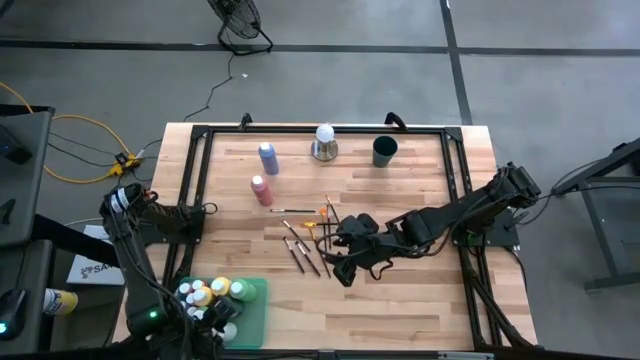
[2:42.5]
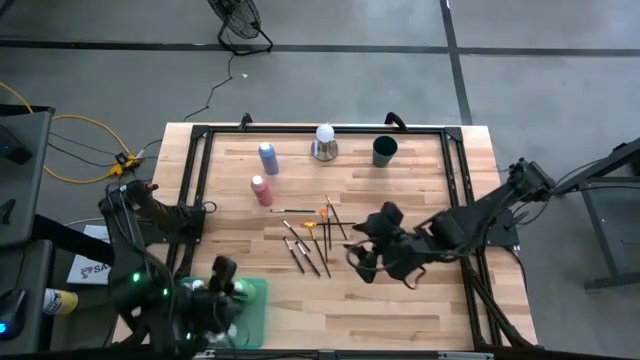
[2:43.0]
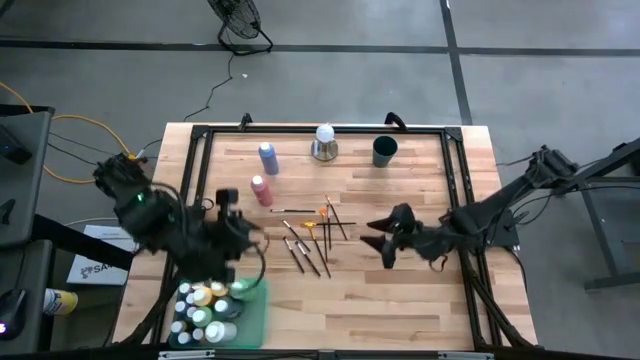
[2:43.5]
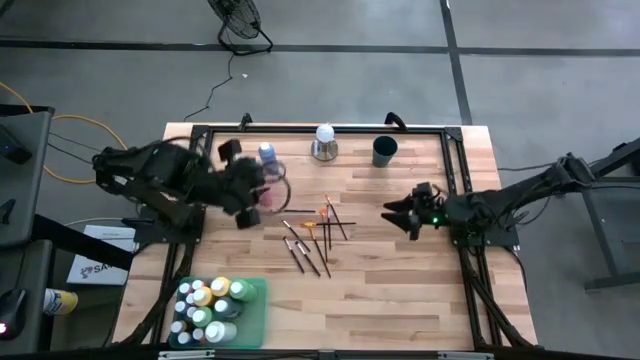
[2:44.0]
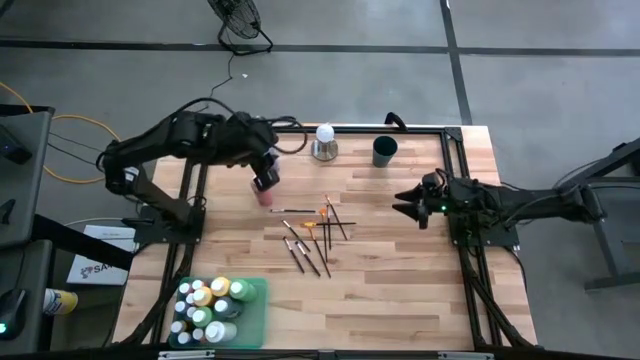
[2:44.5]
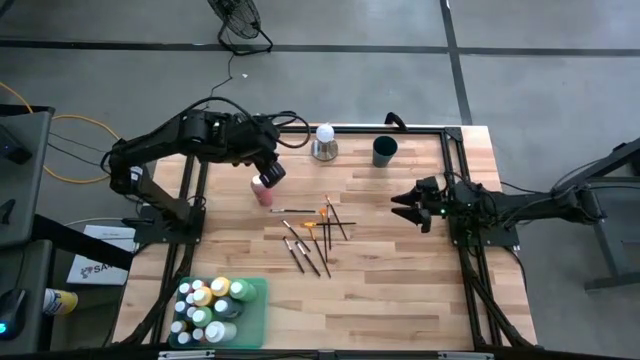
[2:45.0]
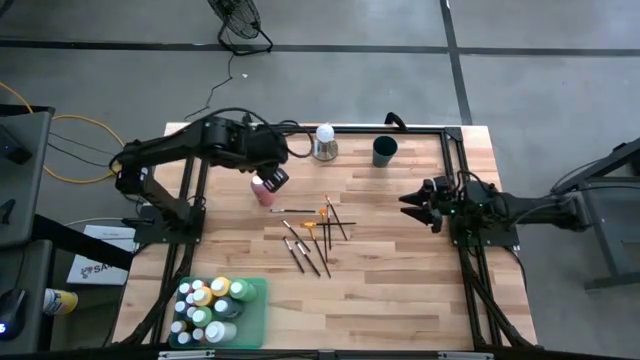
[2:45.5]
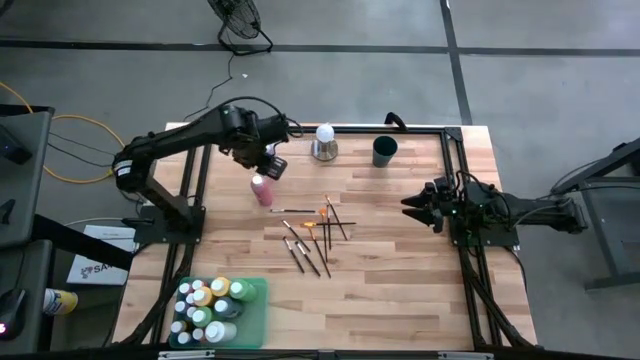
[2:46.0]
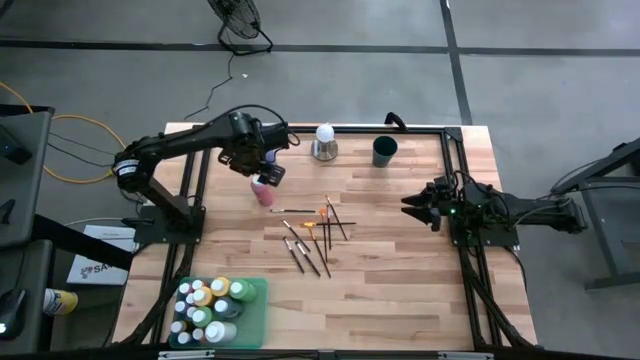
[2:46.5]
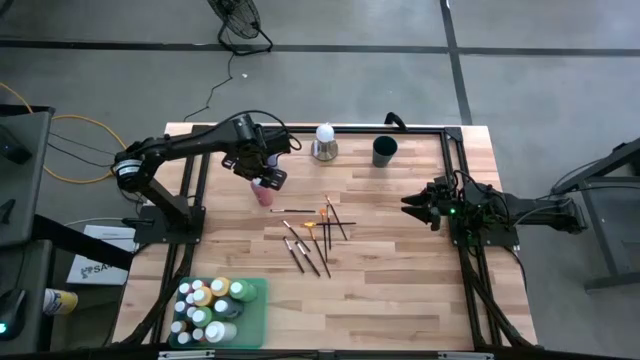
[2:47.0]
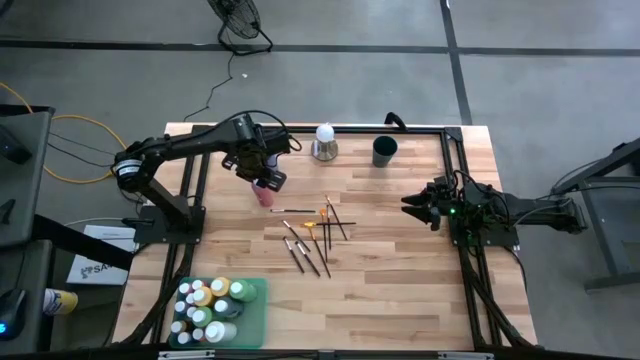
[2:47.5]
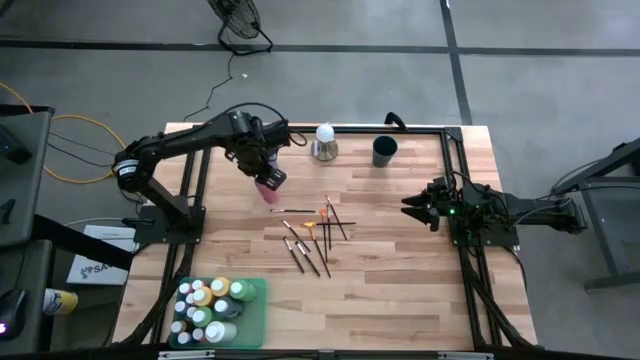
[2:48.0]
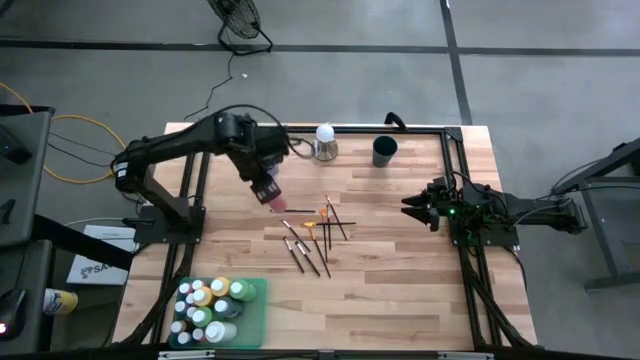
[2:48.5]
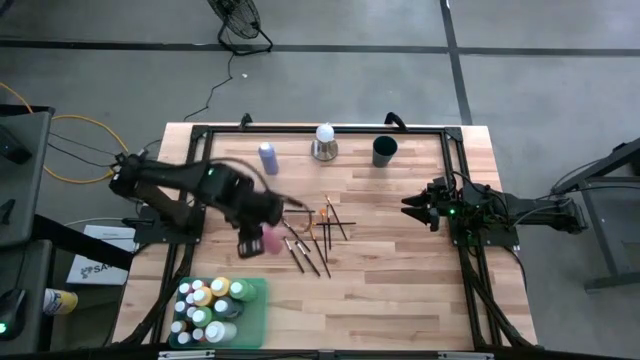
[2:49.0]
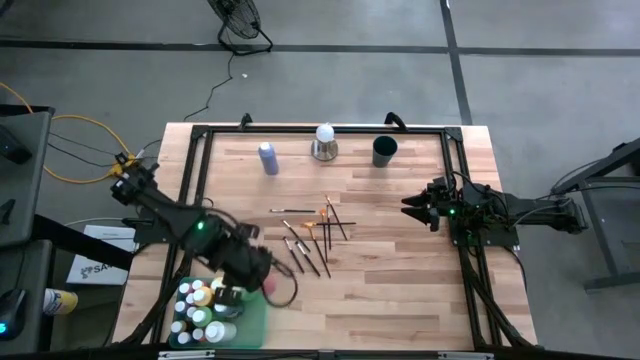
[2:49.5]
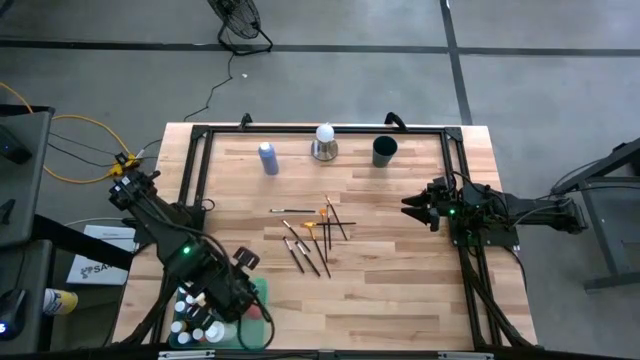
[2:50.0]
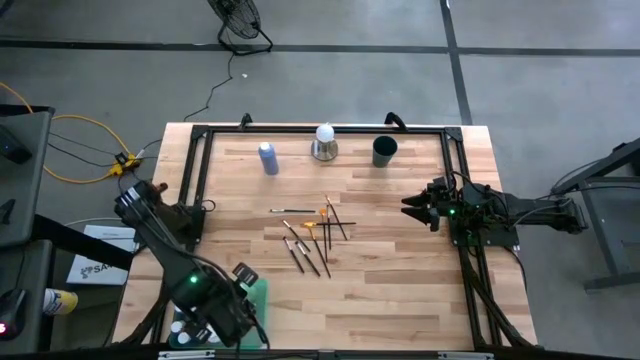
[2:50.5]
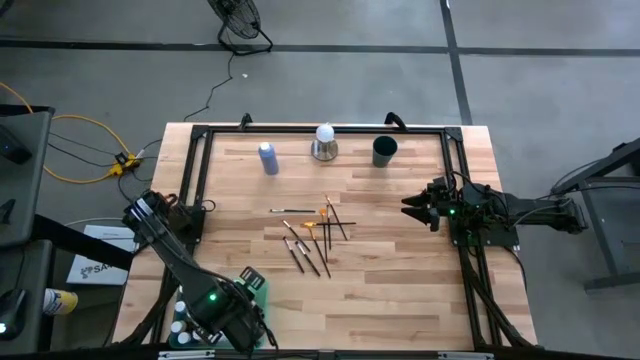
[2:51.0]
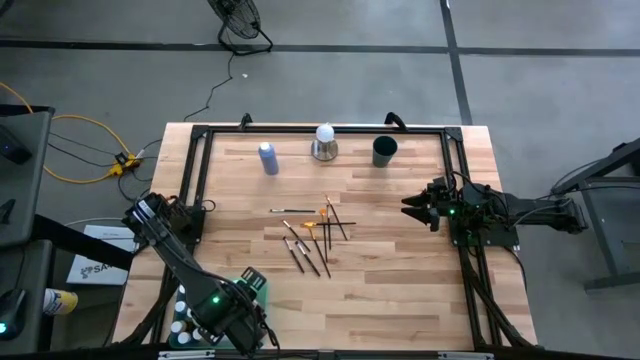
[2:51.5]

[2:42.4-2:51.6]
Task: Pick & Place Paint Supplies
Put the pink paint bottle into the green bin

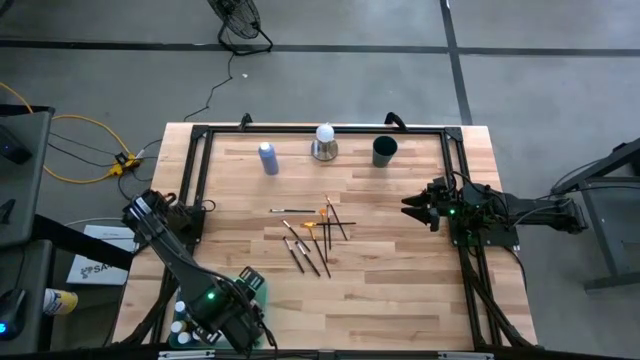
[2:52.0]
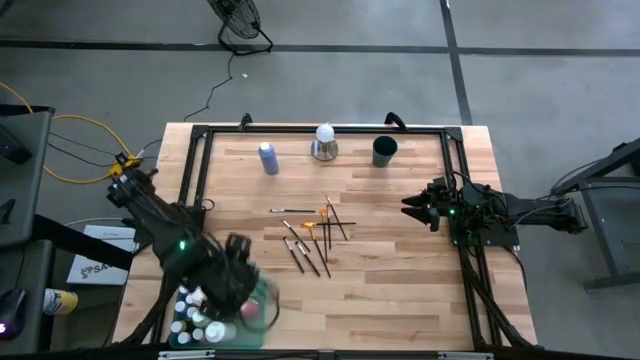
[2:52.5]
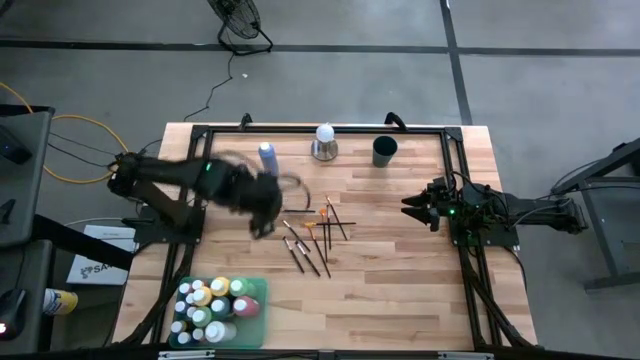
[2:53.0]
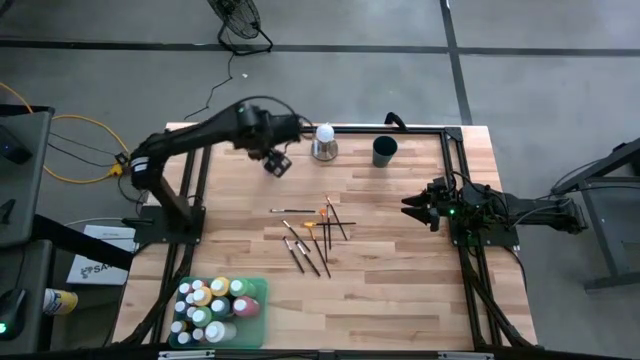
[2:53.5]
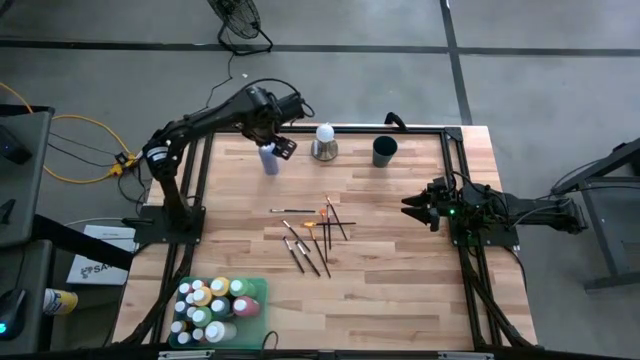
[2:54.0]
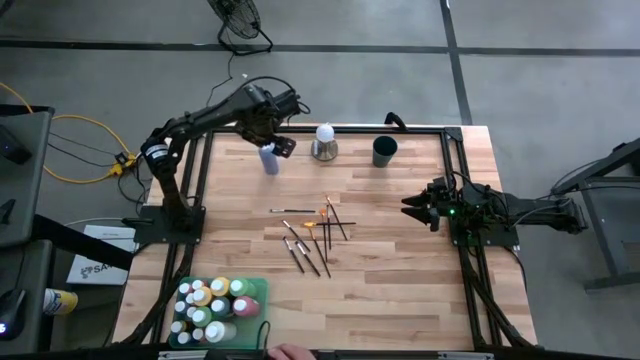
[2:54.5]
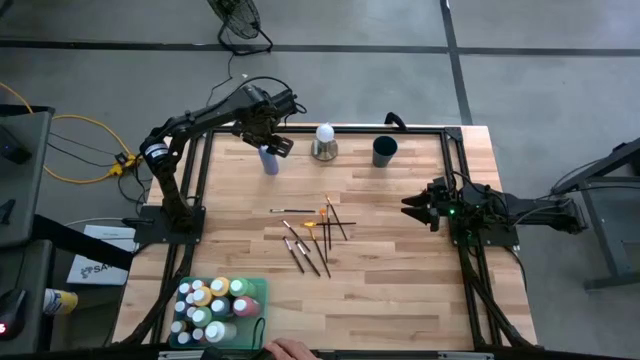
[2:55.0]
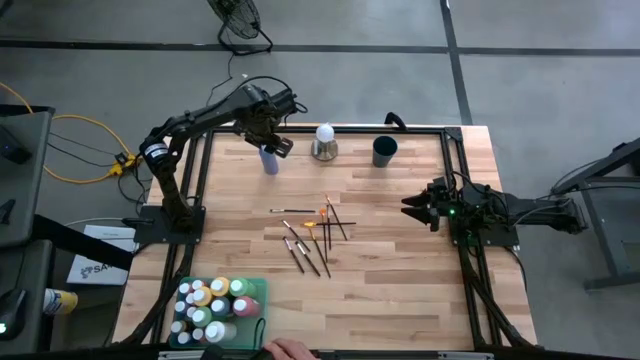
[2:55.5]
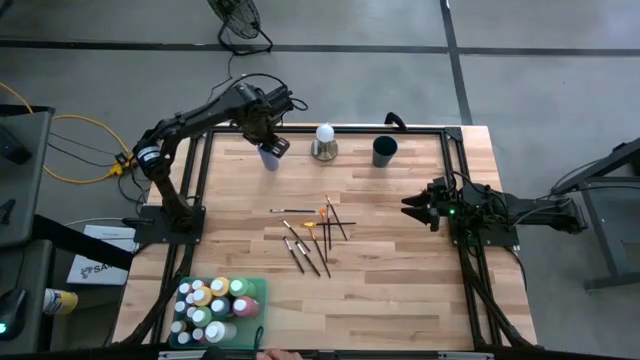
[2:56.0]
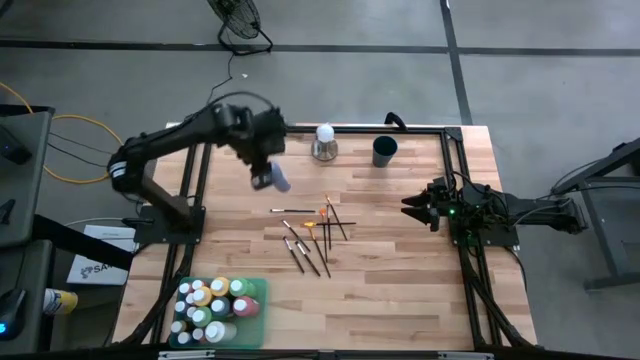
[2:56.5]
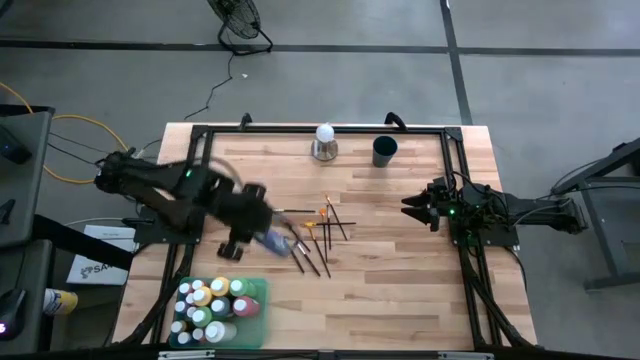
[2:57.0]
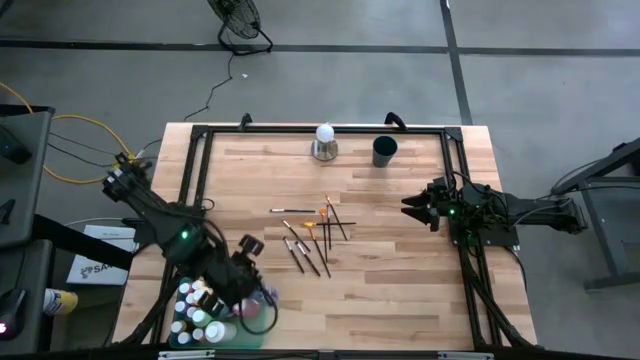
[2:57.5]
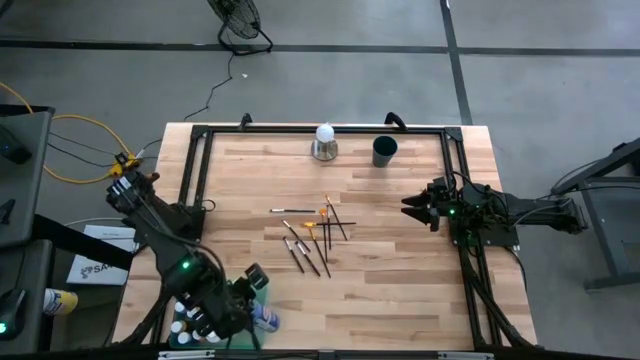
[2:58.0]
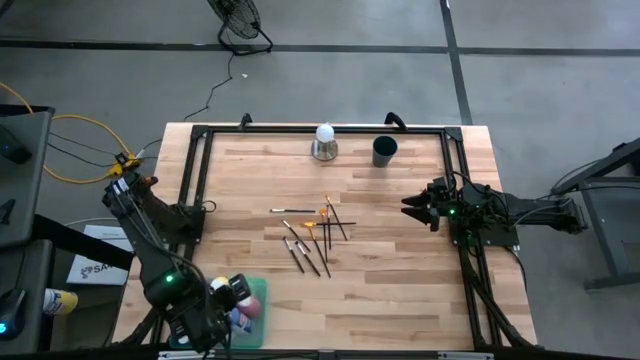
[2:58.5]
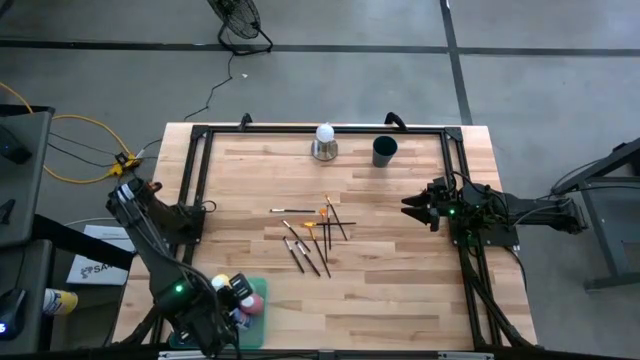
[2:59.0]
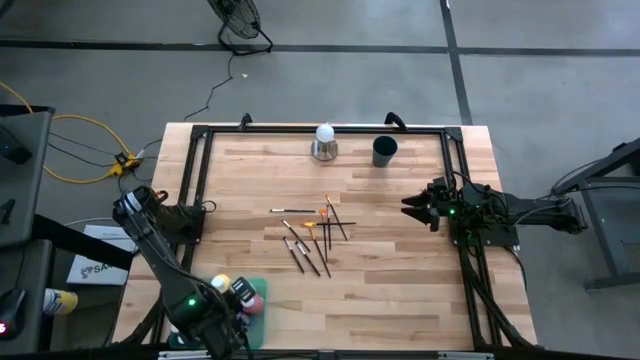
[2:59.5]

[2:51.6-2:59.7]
Put the purple paint bottle into the green bin

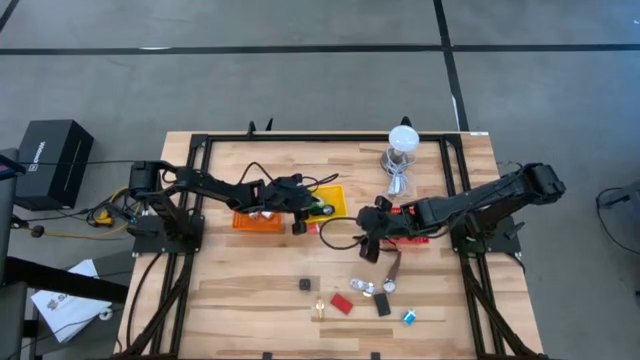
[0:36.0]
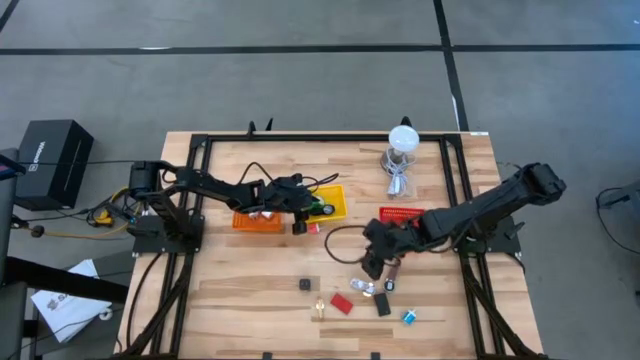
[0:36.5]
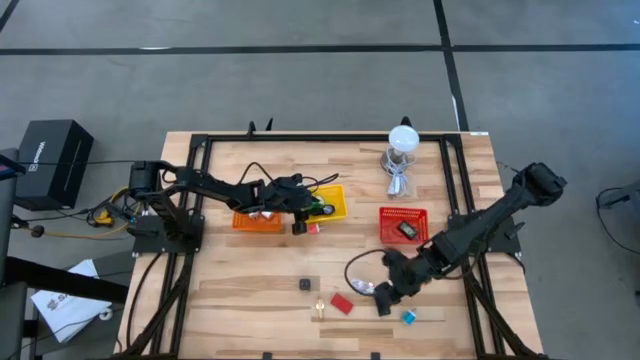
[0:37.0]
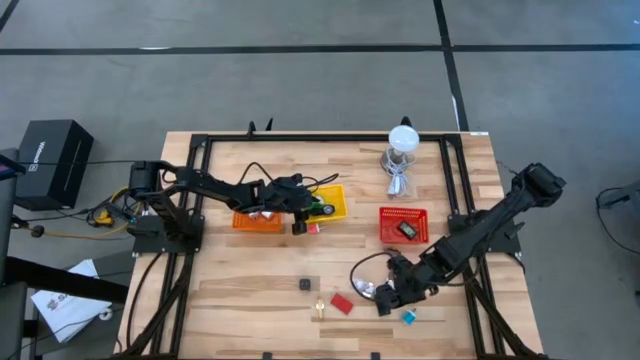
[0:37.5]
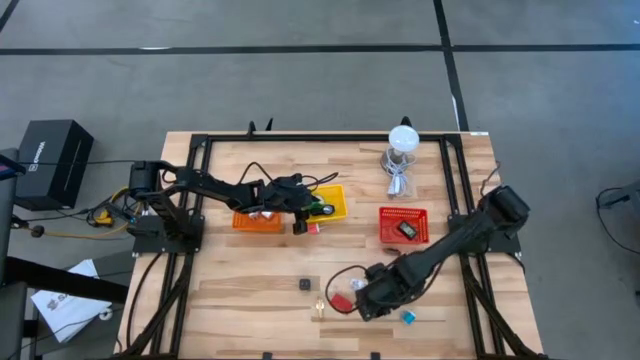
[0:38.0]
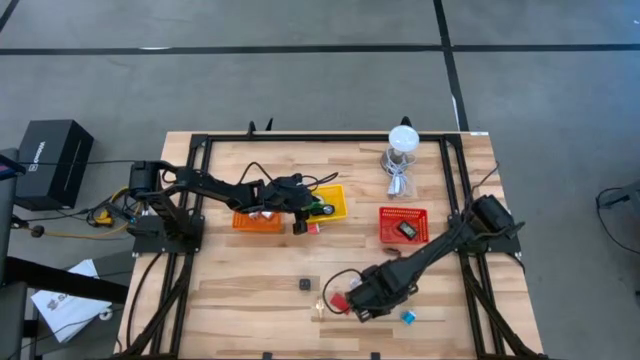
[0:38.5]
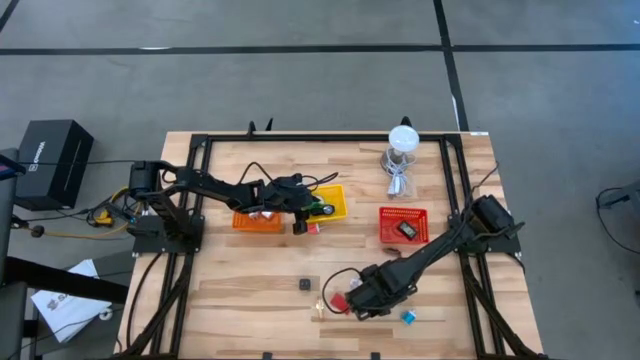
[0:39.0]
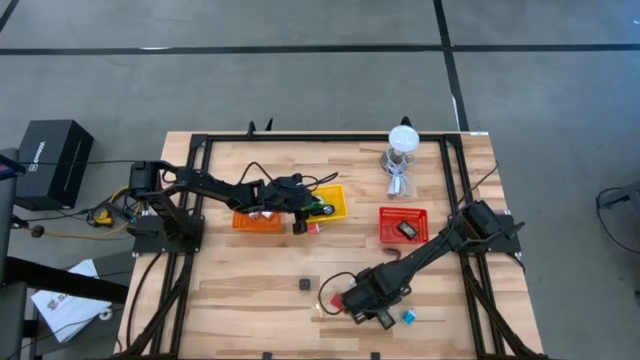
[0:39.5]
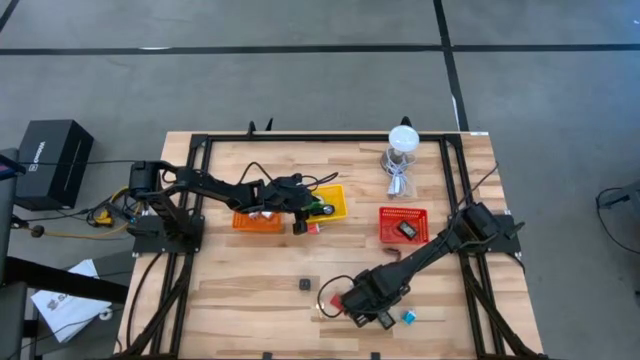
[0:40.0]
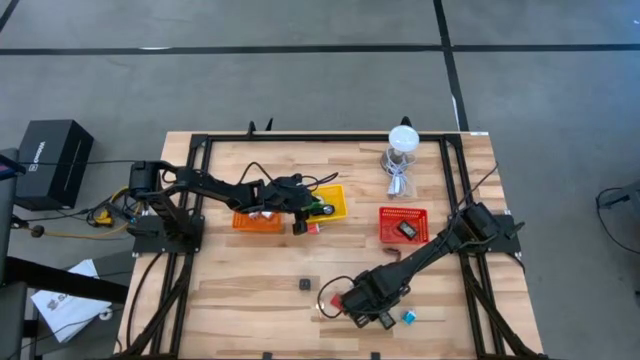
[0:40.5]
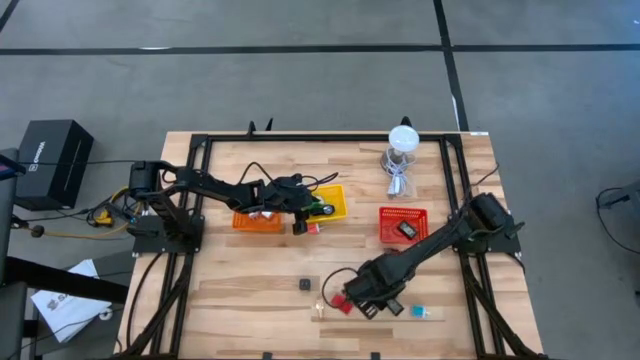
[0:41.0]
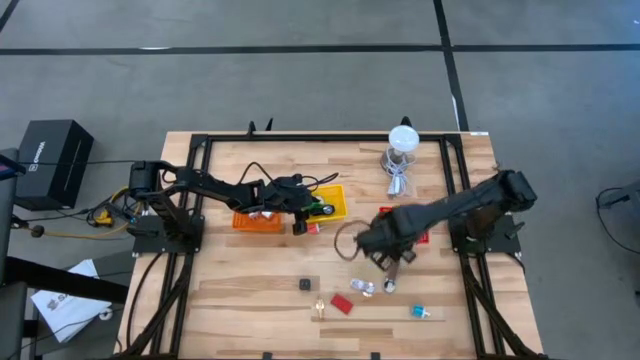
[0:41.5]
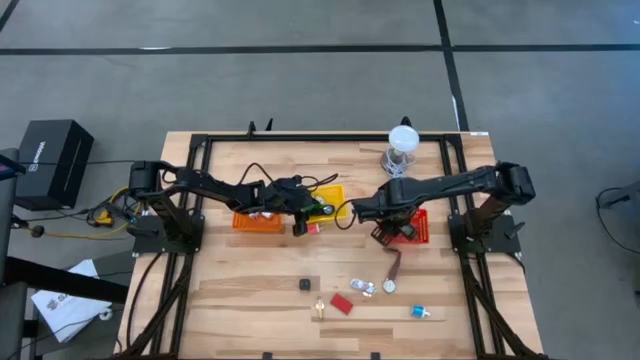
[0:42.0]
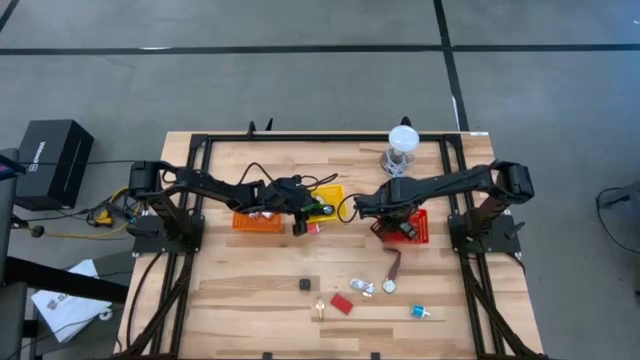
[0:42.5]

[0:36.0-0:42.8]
Task: Pick & Place Office items
Put the black digital clock into the red bin
